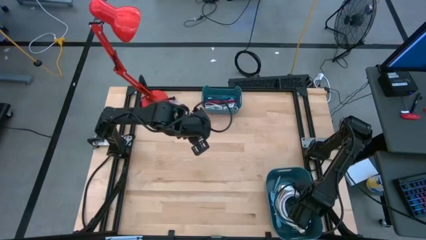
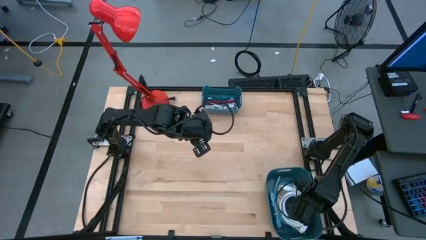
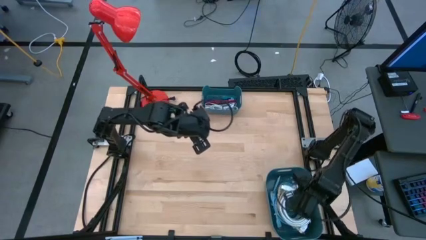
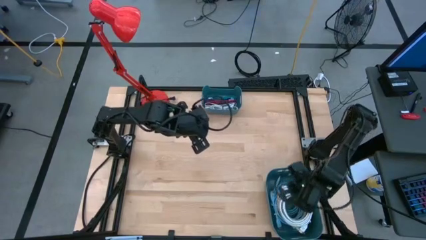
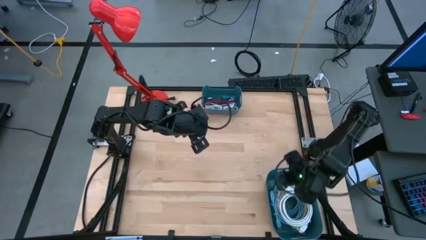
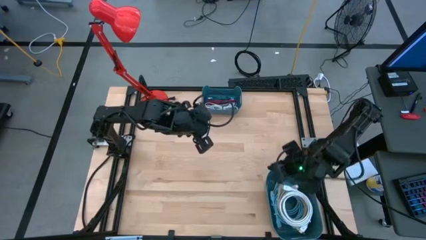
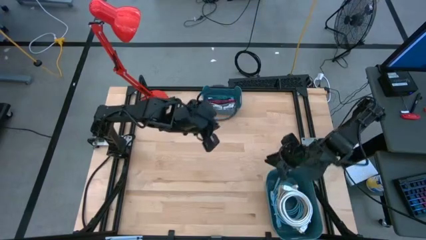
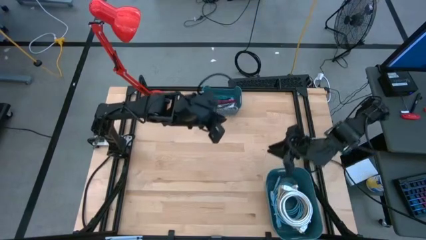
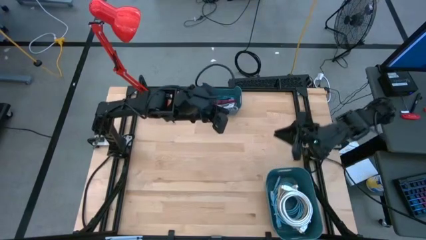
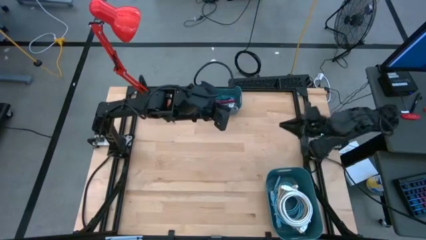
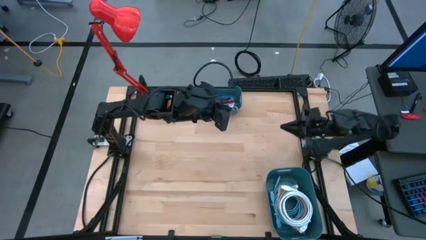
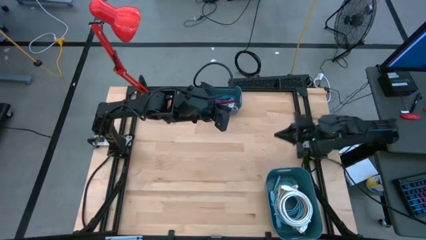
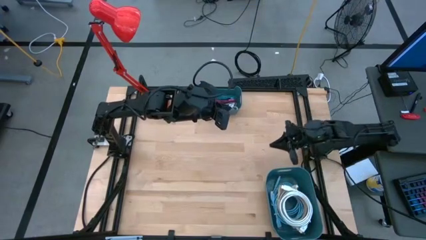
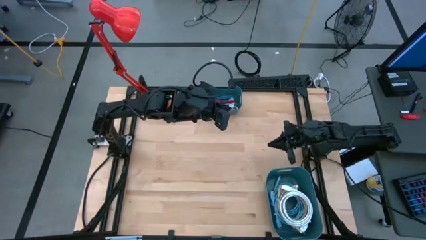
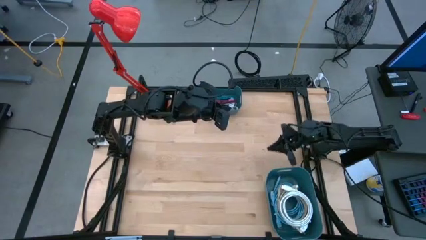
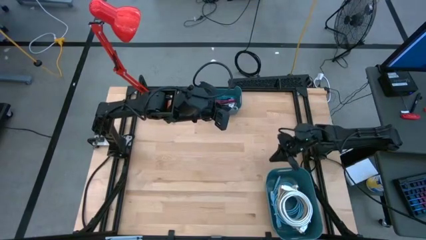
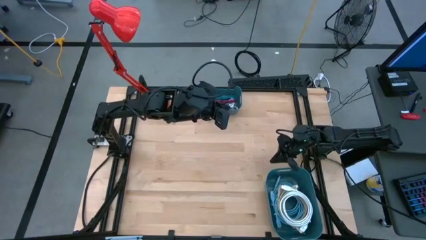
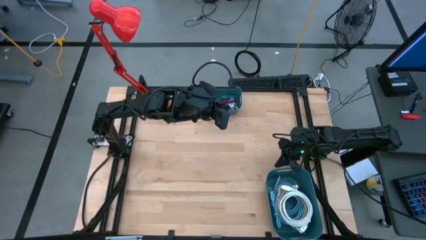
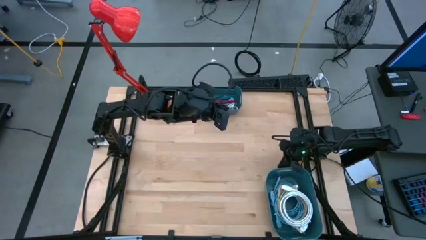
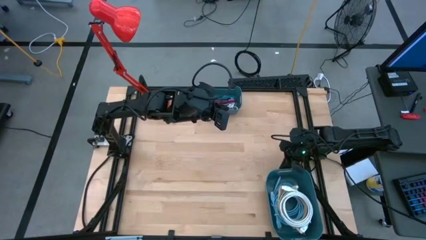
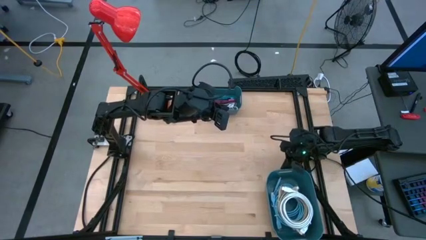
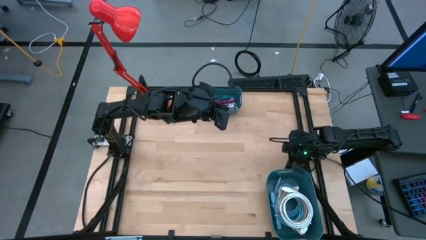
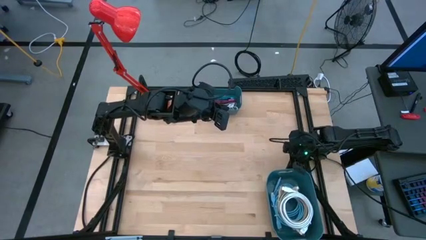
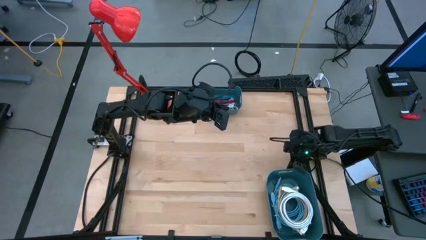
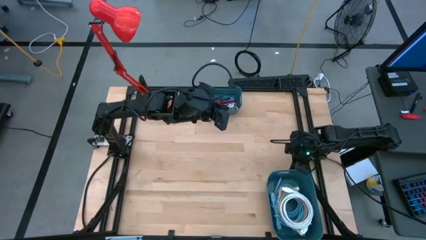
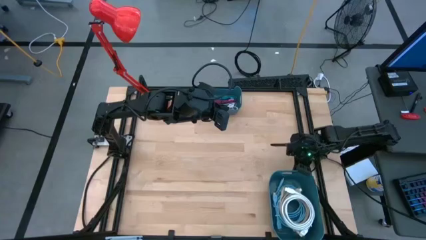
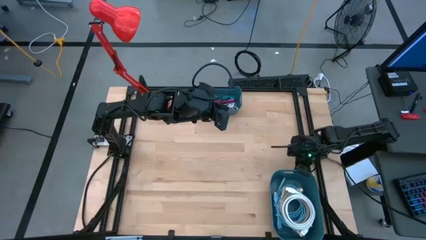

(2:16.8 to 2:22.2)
Task: Pick & Place USB Port
Adjust the bottom blue bin

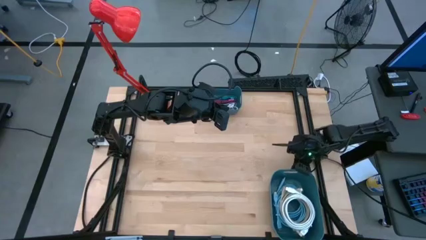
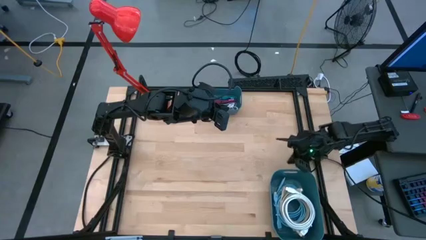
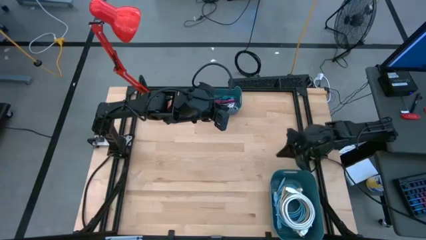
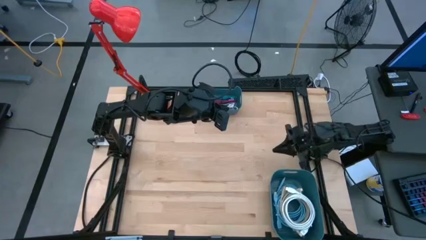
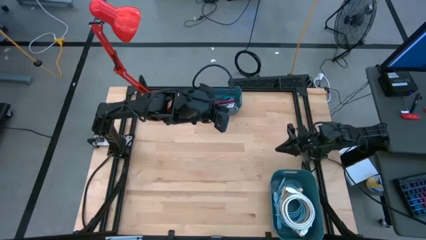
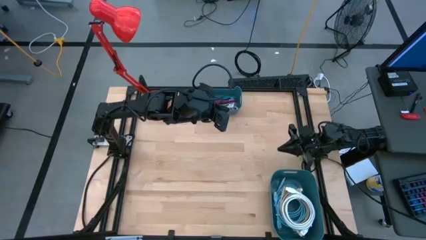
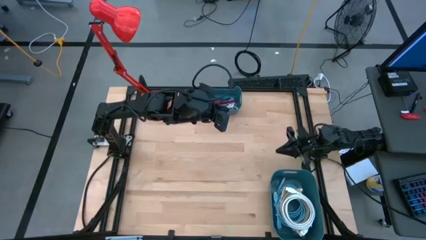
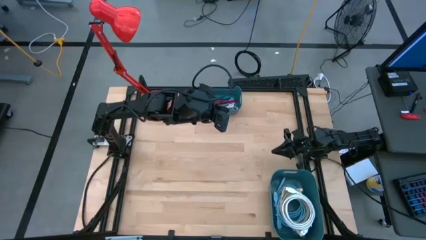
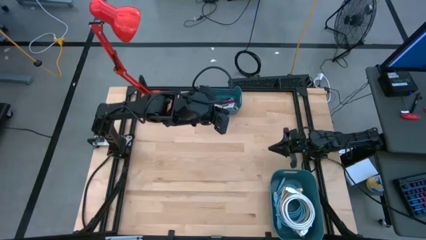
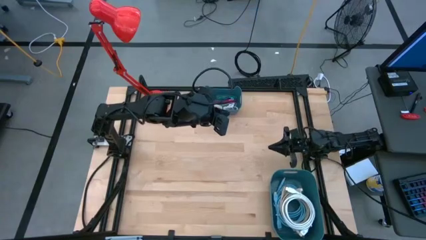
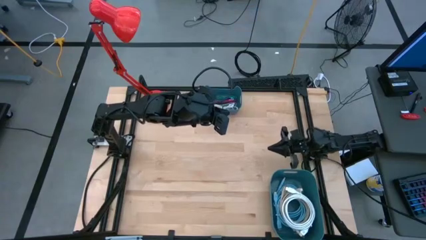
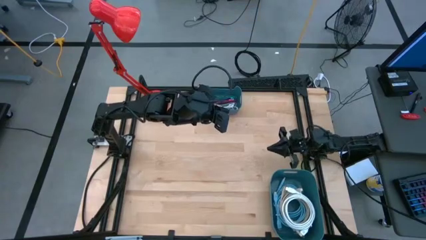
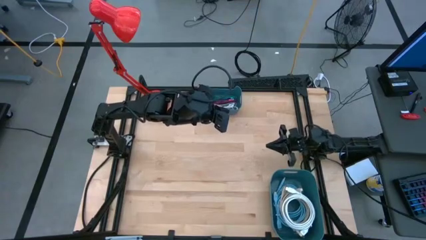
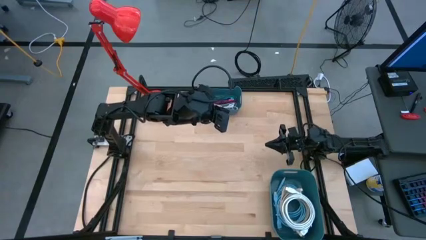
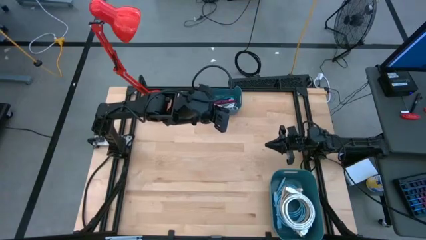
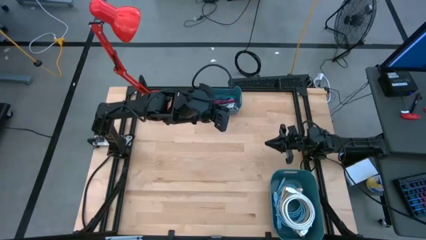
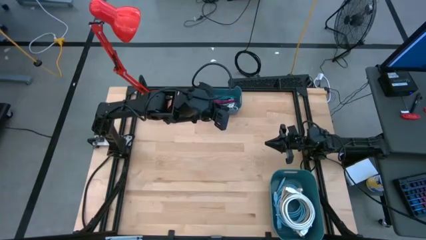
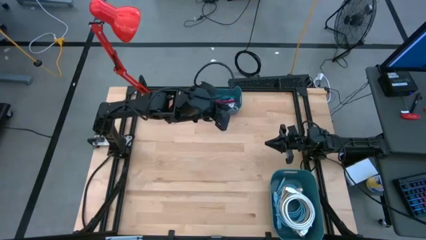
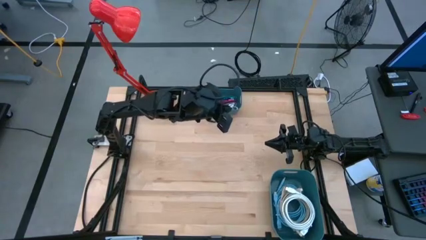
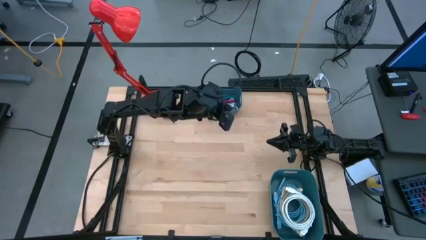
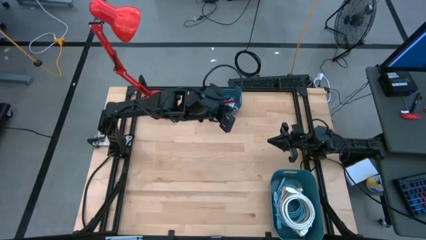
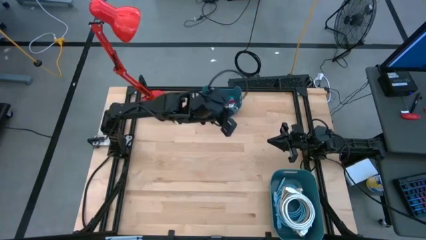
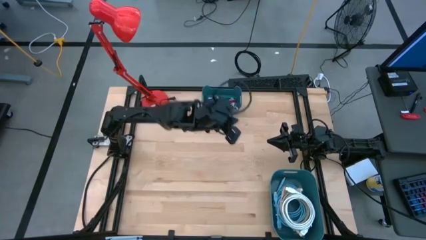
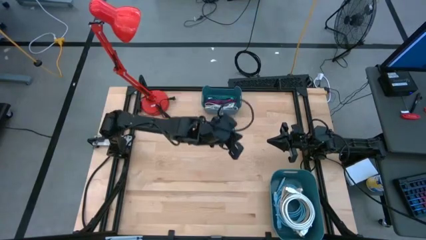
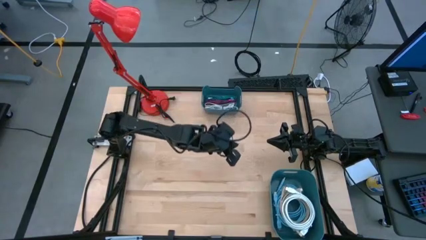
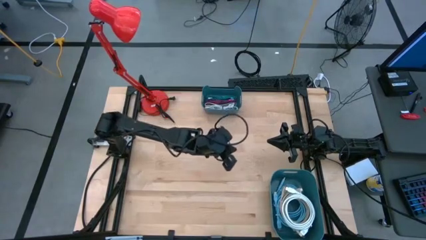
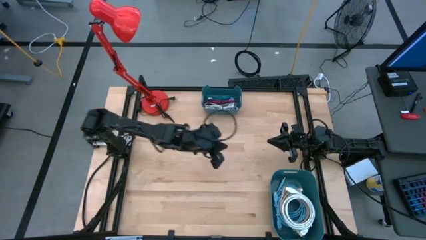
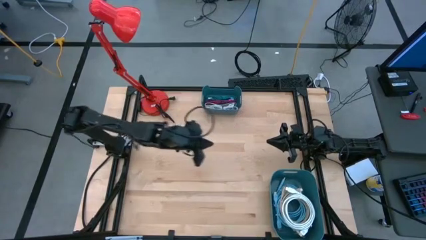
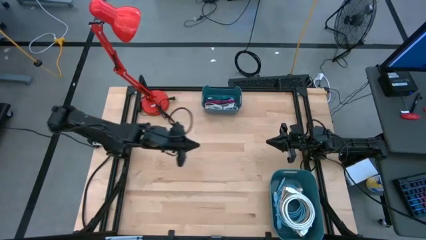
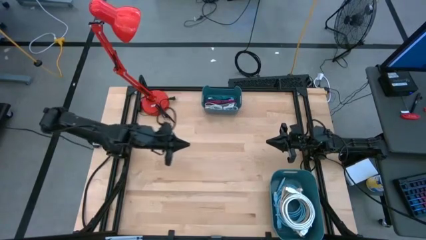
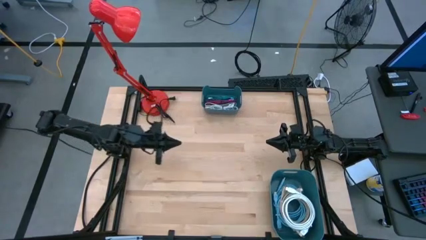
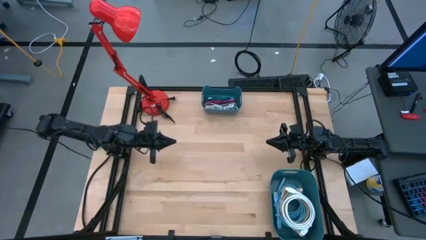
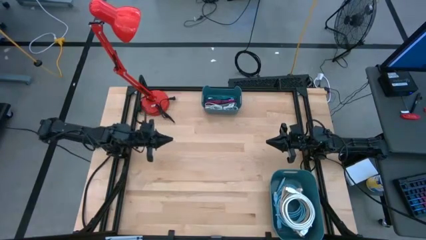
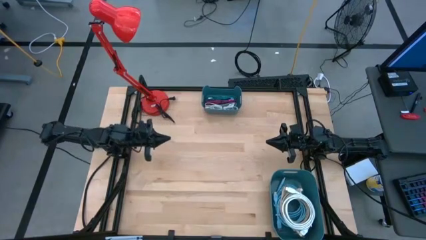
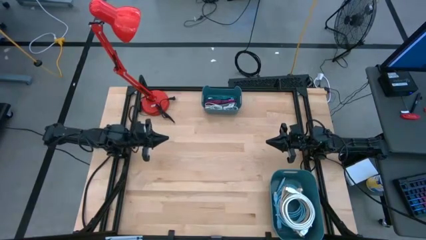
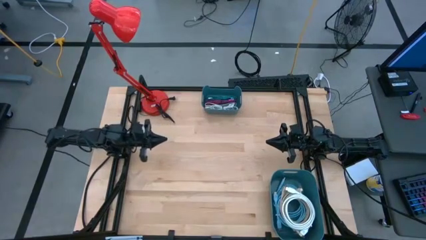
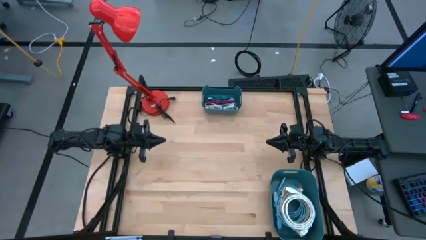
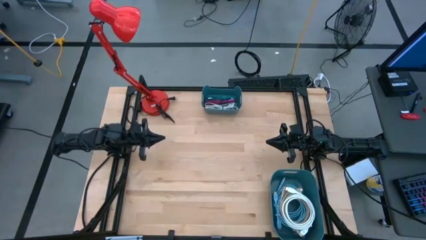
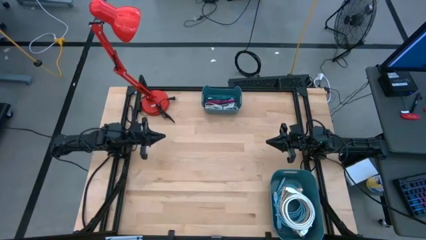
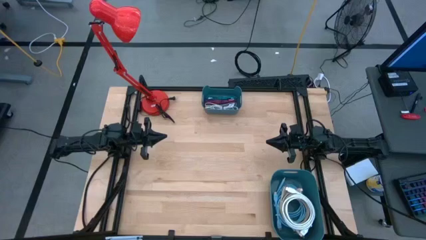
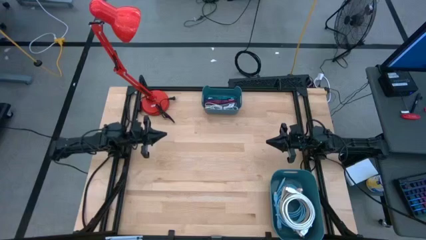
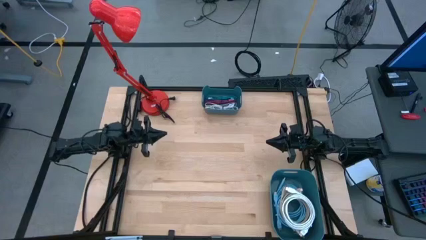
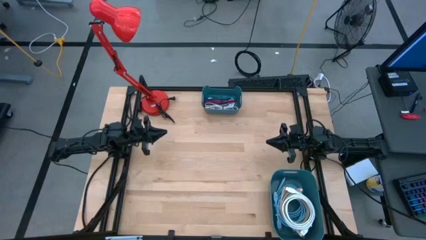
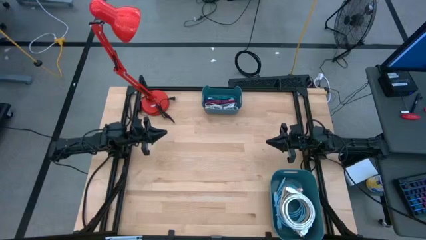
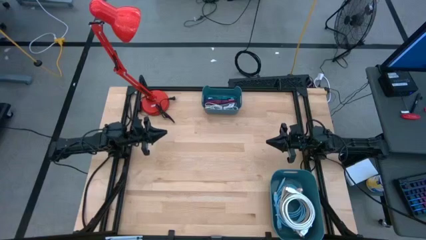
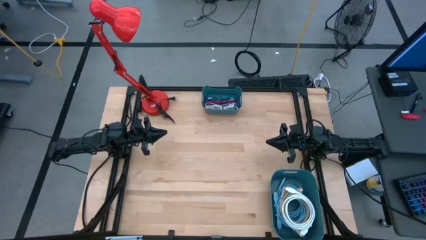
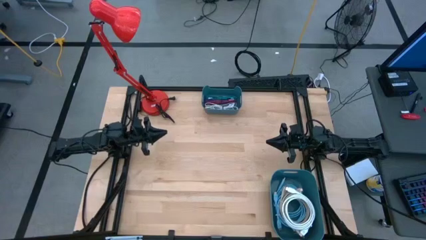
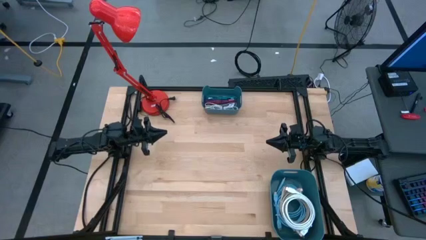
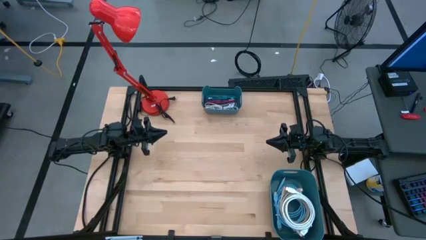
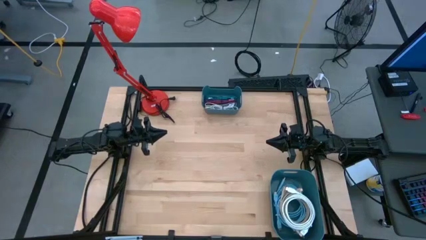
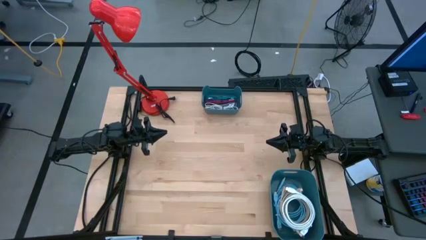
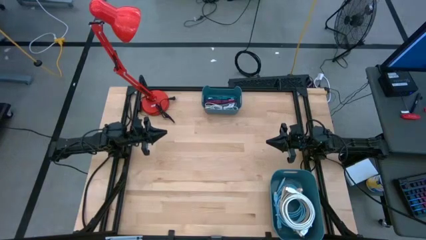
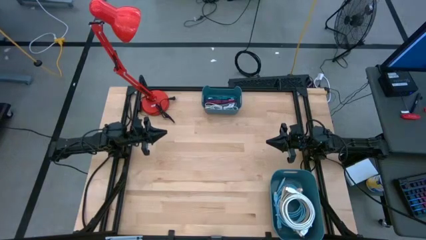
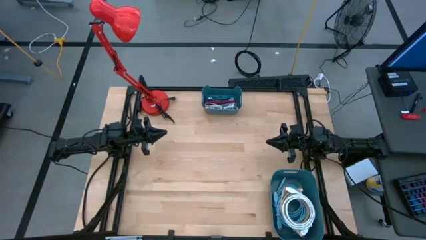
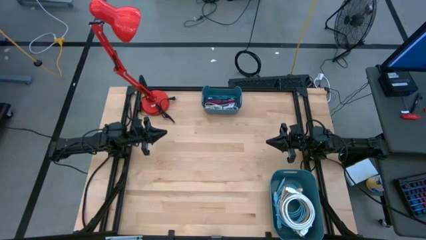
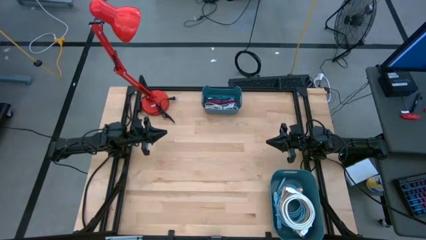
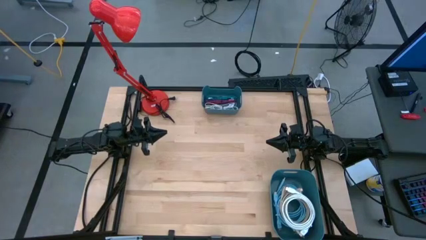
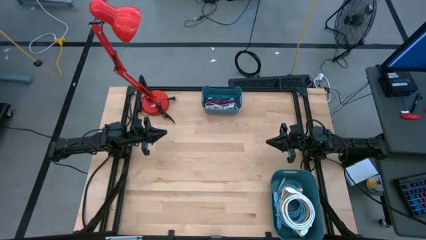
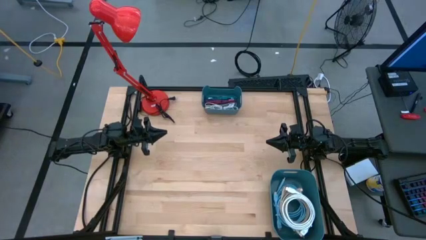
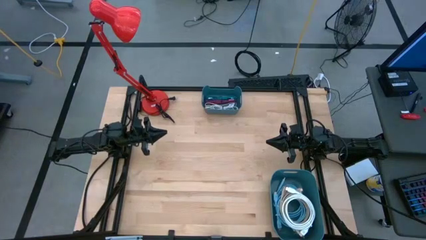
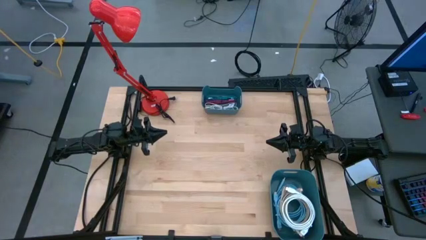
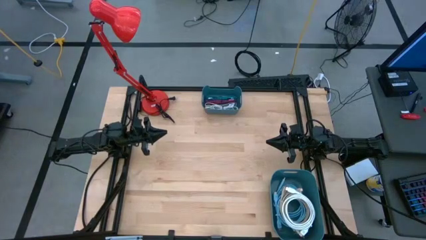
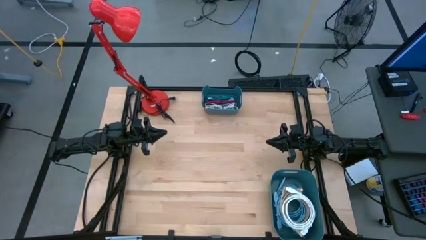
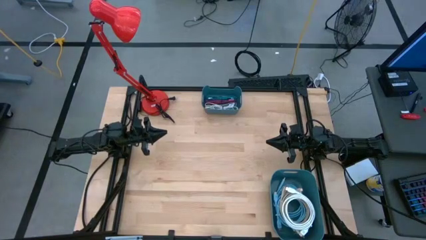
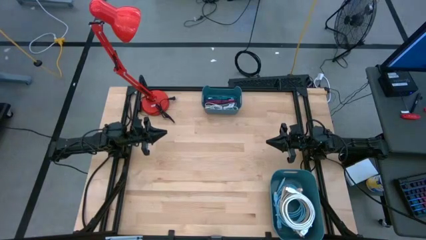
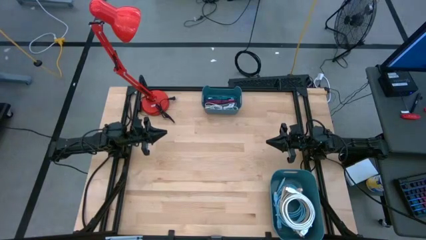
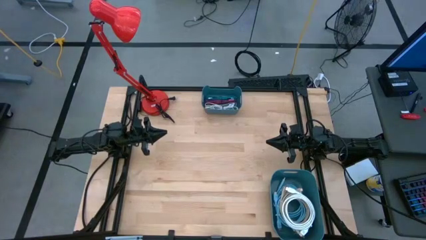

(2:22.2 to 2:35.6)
Return to Home Position
